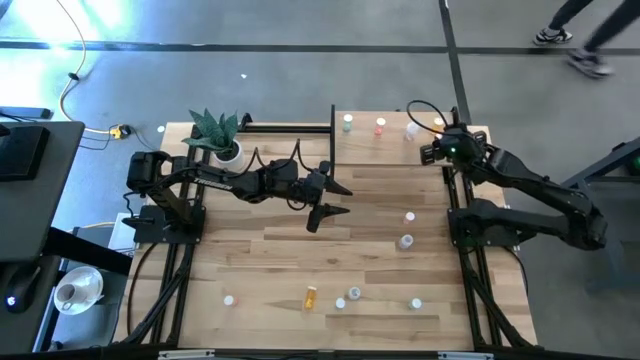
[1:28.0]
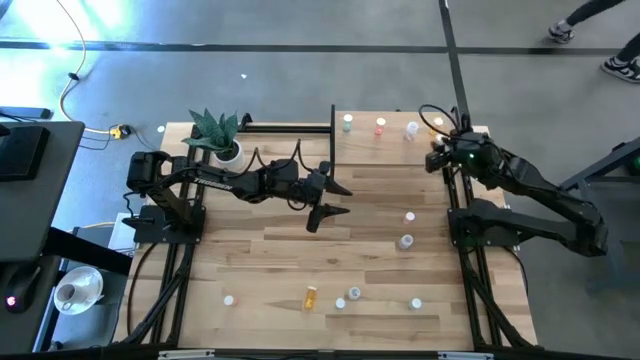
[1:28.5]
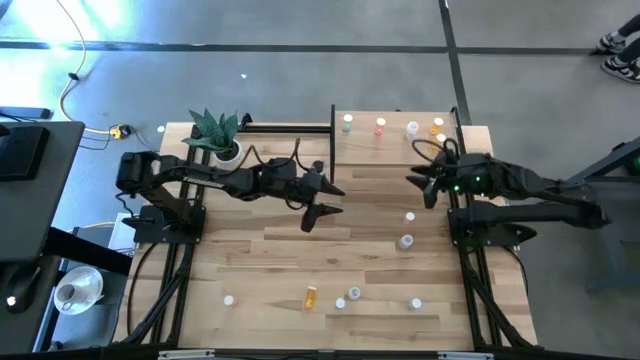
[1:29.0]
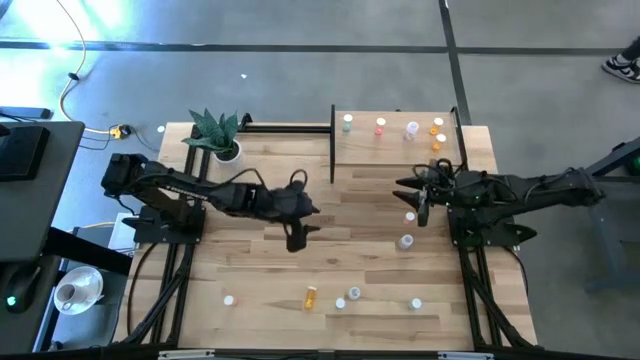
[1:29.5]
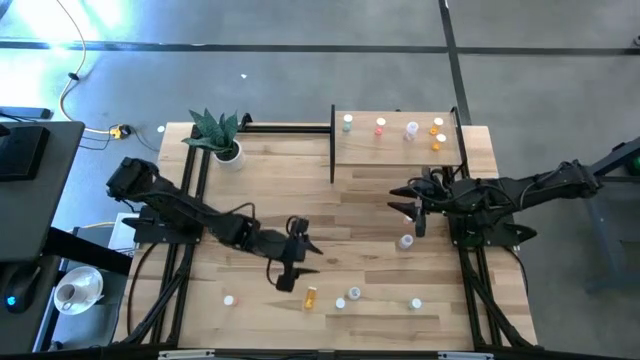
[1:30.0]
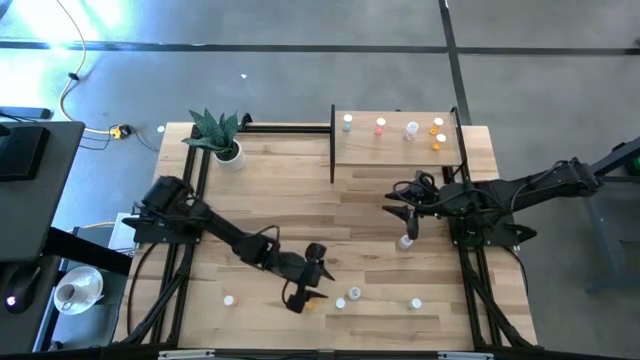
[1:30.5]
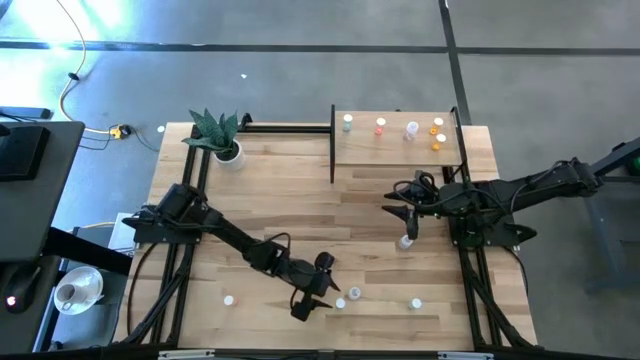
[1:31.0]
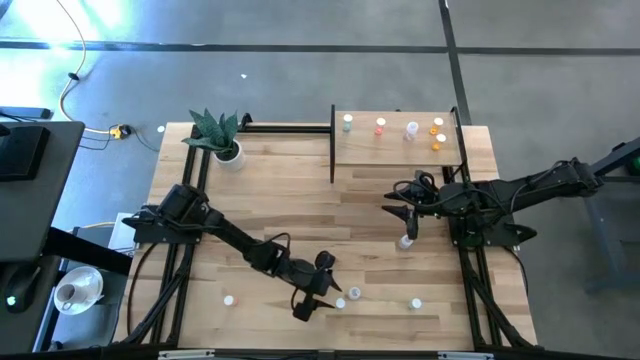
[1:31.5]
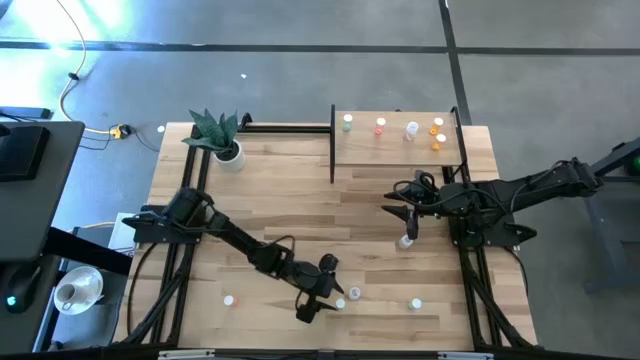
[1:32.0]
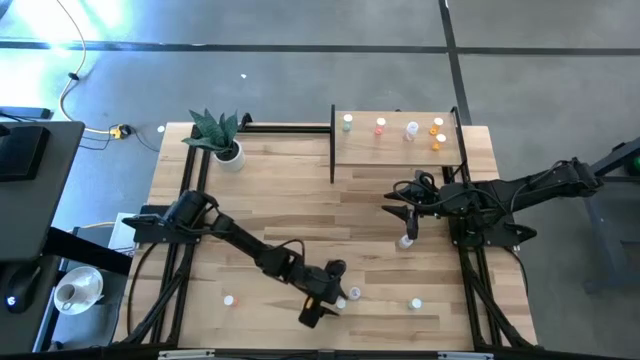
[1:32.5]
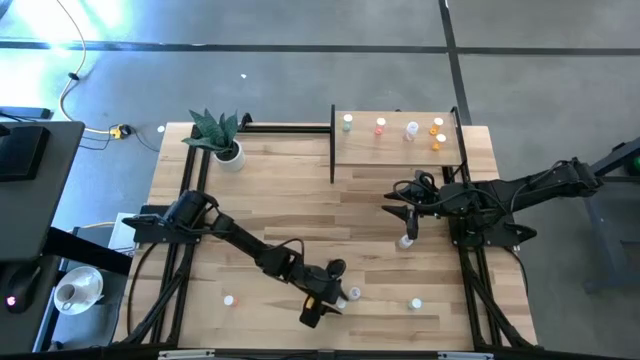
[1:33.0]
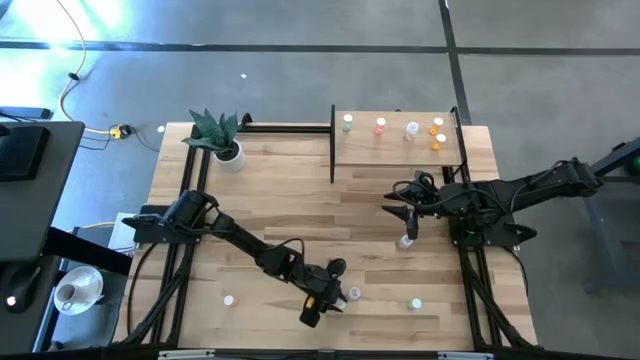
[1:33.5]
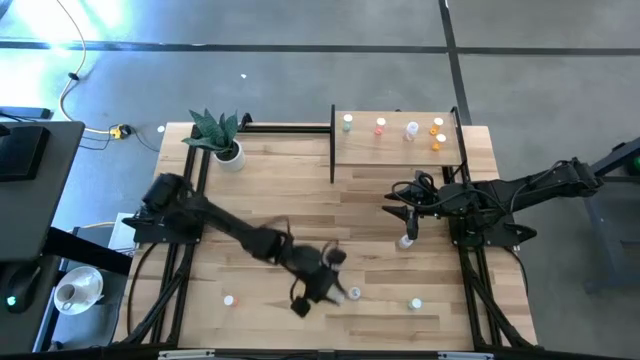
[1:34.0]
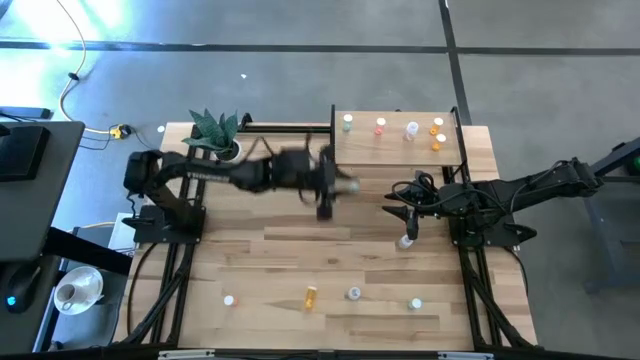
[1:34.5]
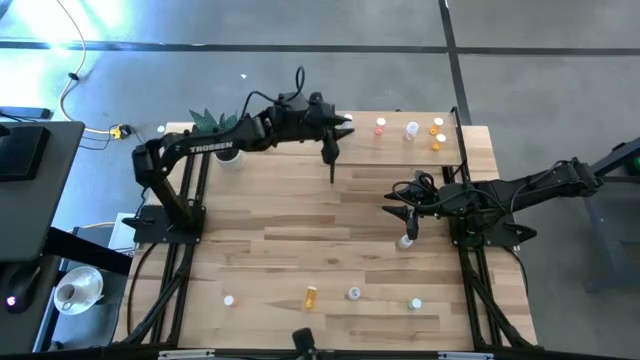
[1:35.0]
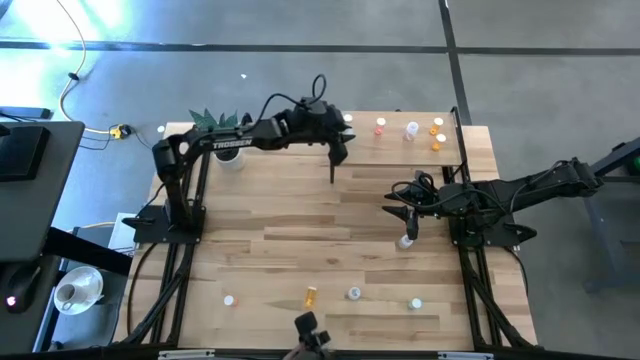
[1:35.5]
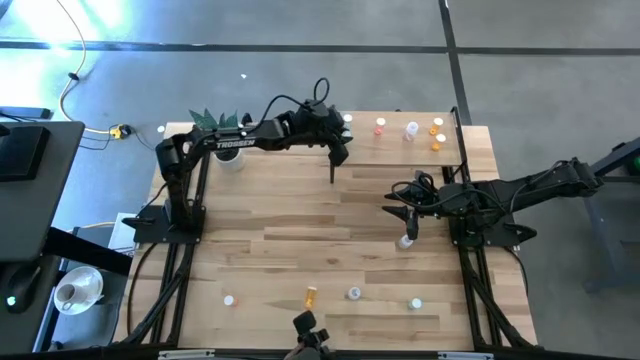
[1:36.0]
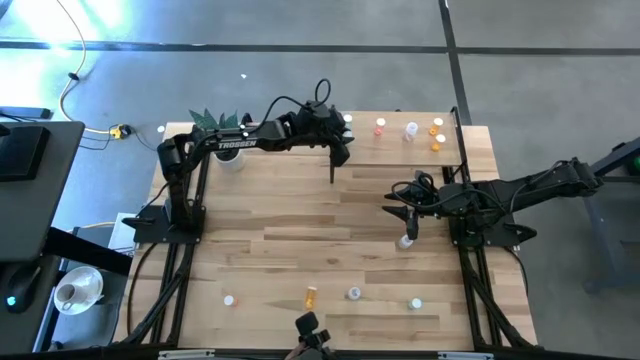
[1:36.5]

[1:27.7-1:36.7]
Task: Pick and place medicine bottles onto shelf by color
Put the left green pill bottle on the shelf aligned with the other green pill bottle

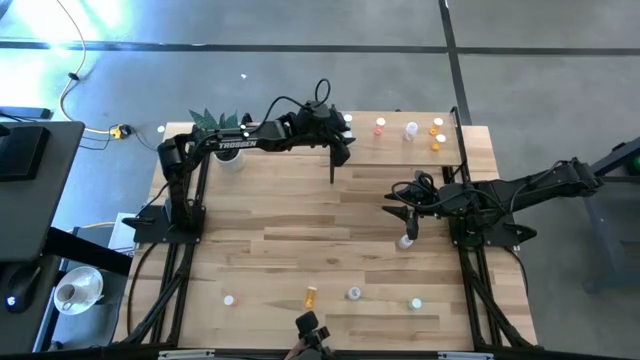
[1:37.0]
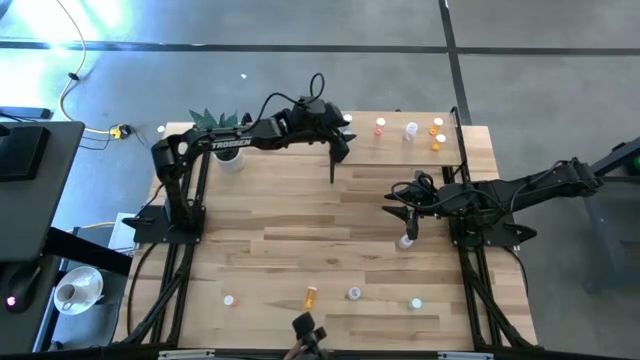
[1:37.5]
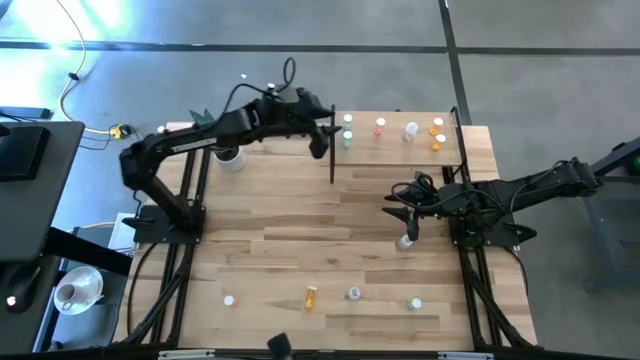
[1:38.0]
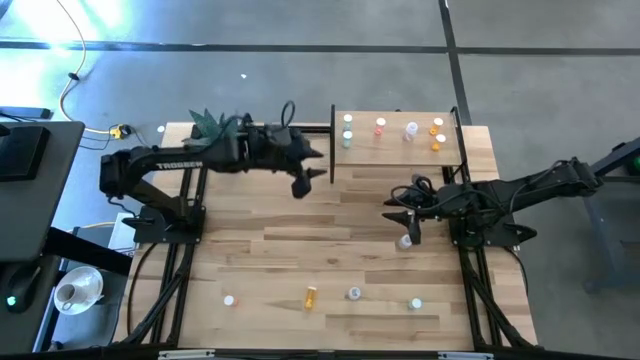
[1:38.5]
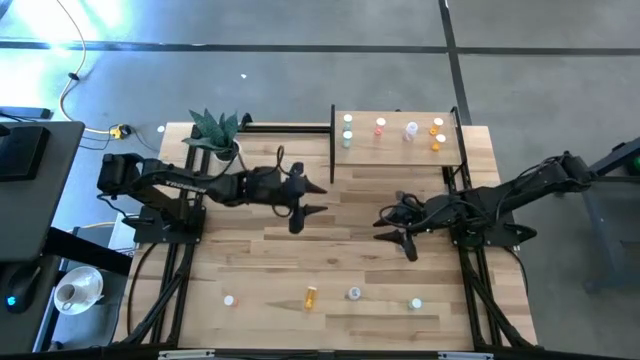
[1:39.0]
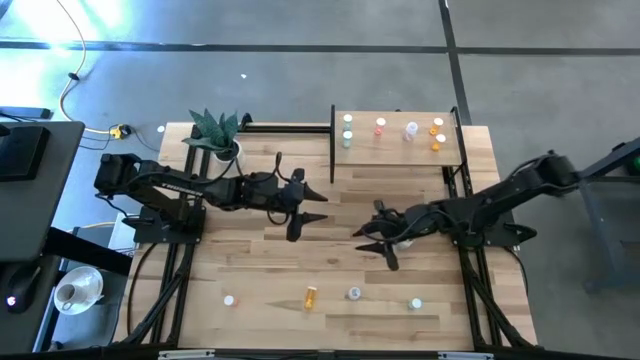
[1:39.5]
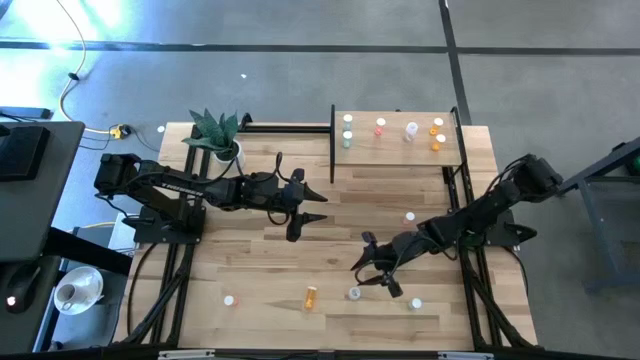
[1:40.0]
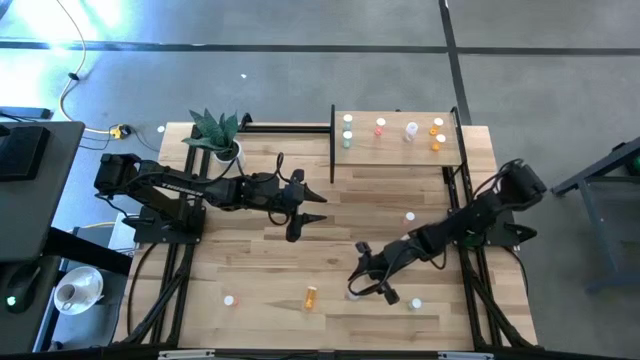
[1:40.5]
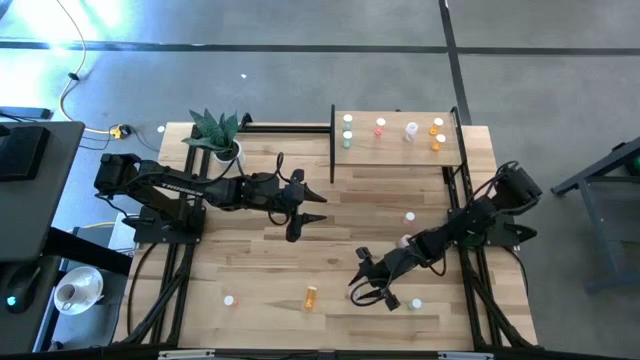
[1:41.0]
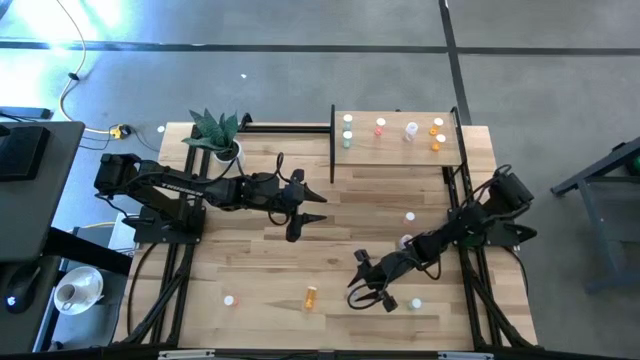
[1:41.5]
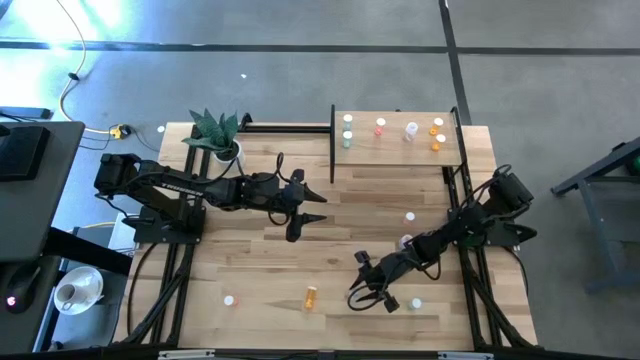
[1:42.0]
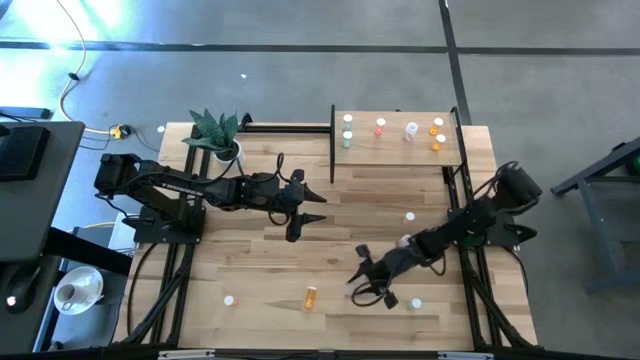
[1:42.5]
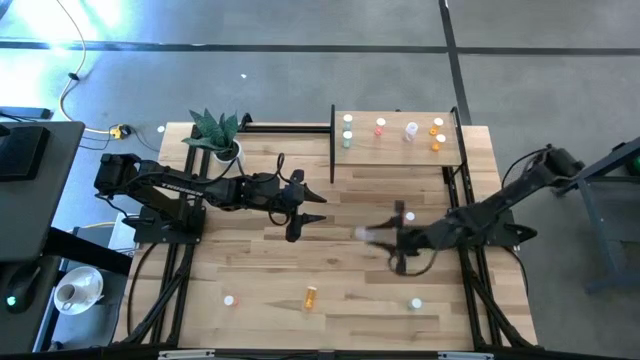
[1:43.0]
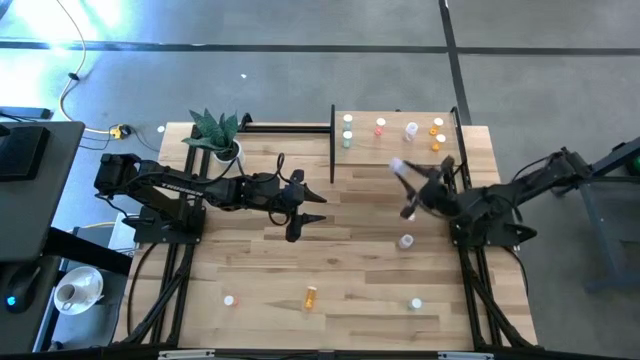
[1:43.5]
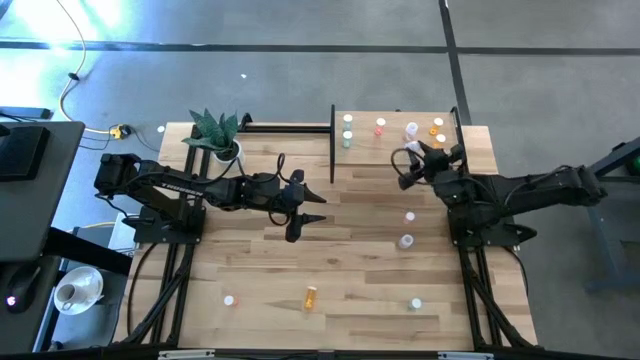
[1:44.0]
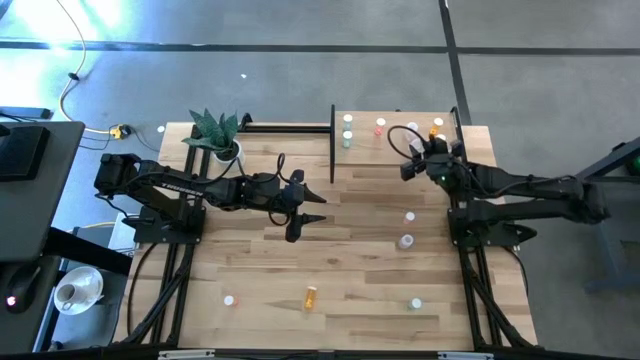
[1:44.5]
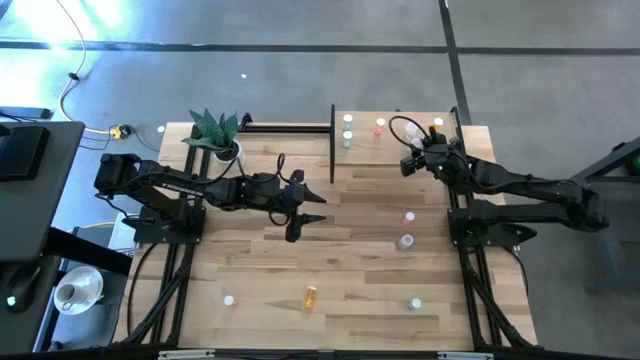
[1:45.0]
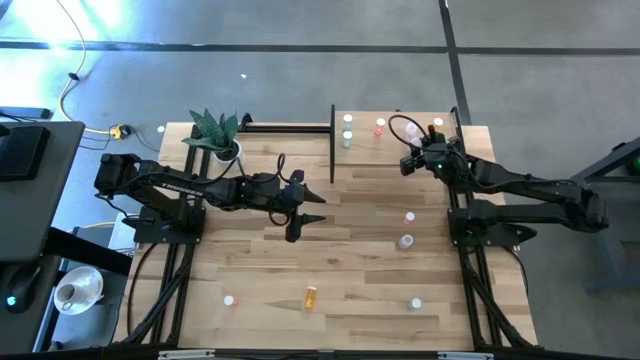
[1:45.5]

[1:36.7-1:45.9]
Put the bottom transparent bottle on the shelf aligned with the other transparent pill bottle

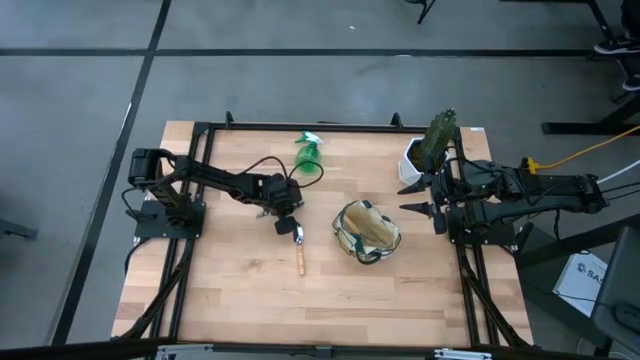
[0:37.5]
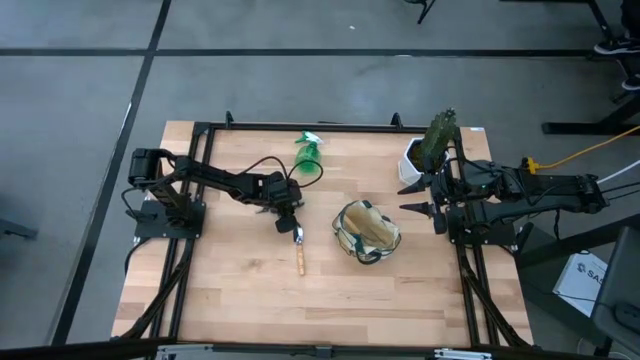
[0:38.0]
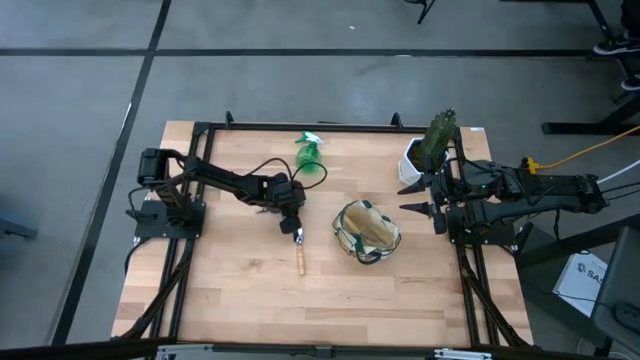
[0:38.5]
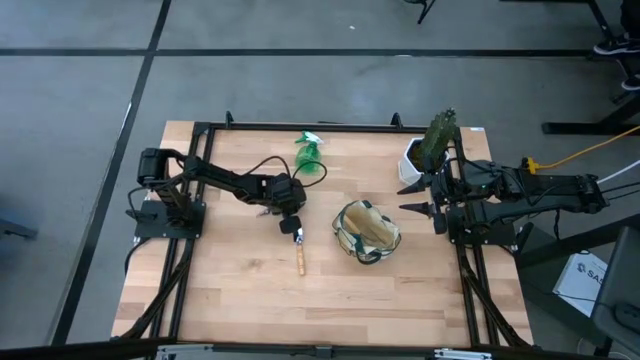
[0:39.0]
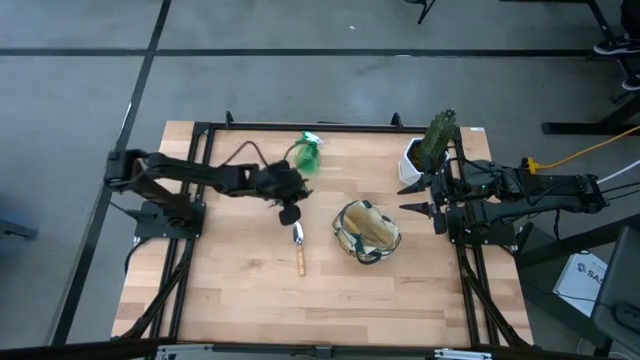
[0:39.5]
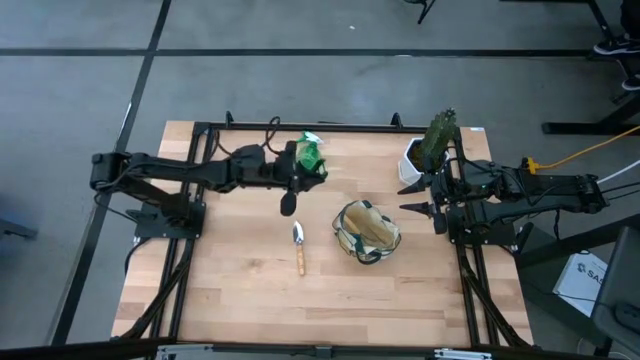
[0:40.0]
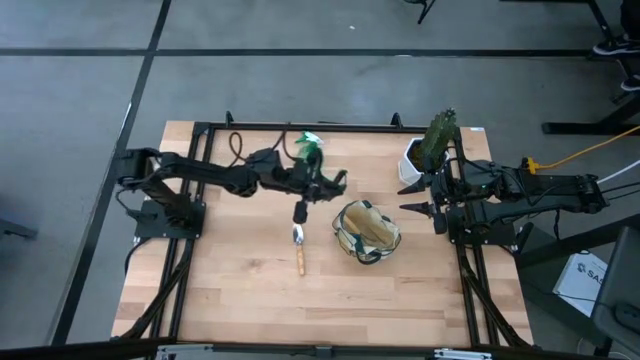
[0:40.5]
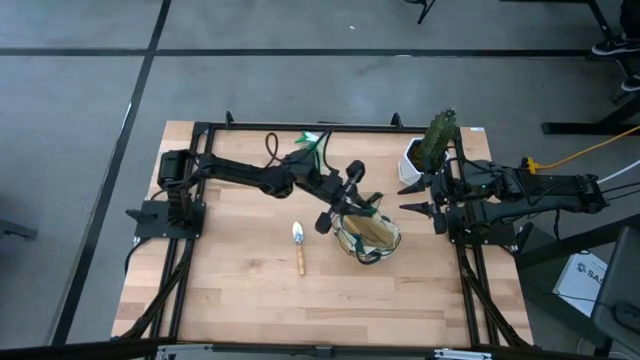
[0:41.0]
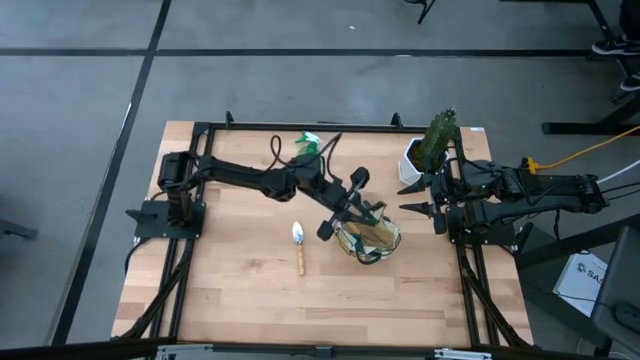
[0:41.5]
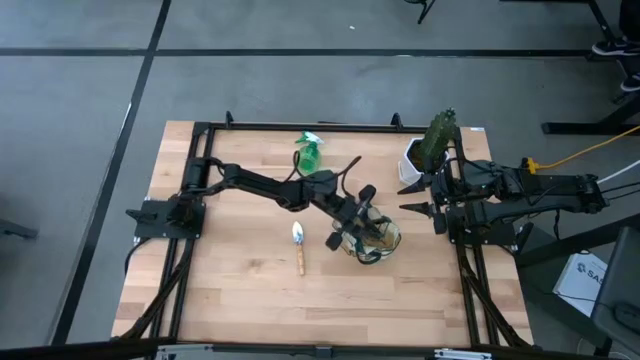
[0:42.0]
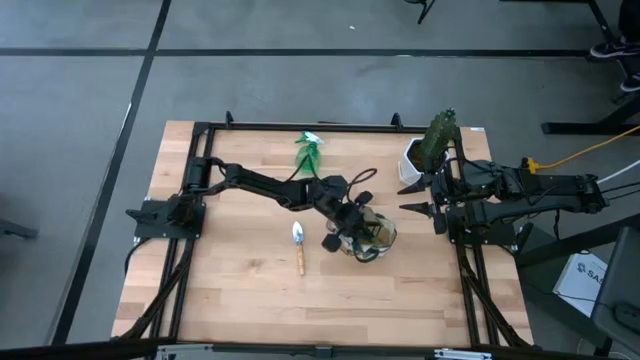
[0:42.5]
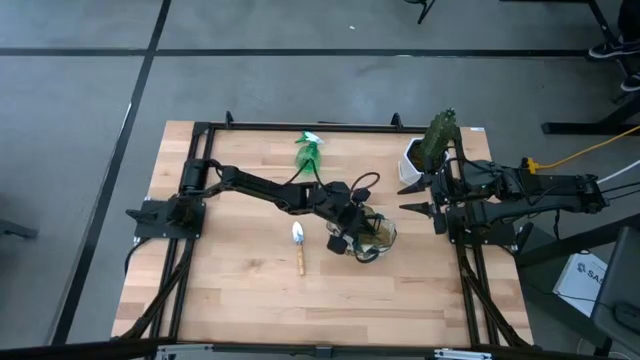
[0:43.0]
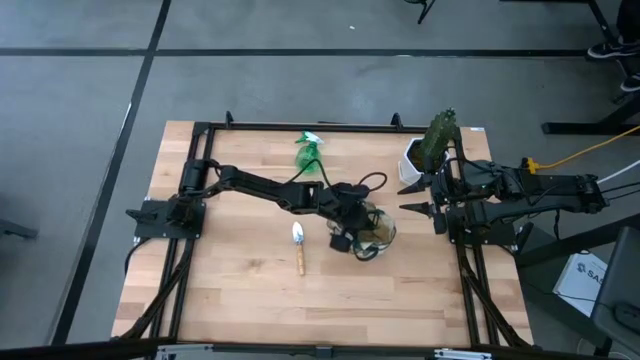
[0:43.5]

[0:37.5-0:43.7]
Task: Pick & Place Garden tools in Gardening bag
Put the green shear scissors into the light brown gardening bag
